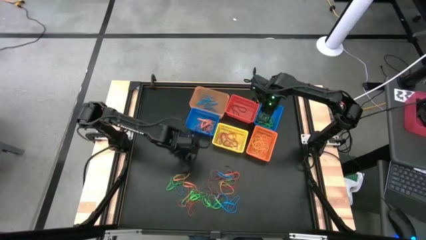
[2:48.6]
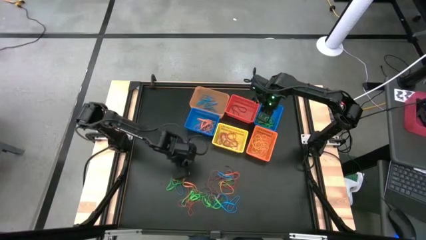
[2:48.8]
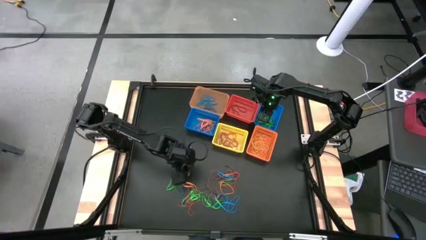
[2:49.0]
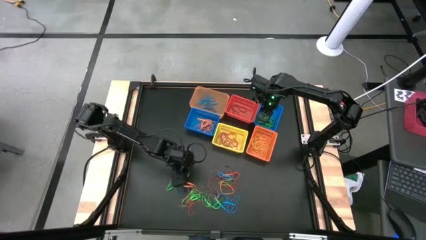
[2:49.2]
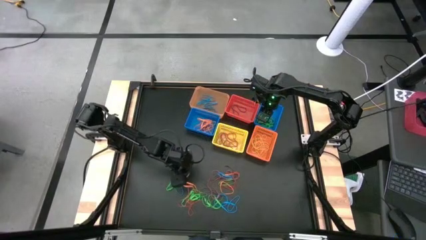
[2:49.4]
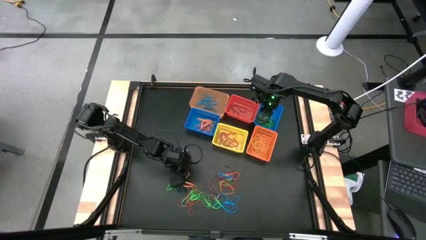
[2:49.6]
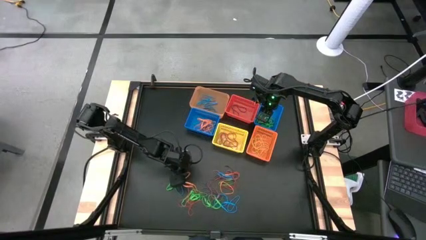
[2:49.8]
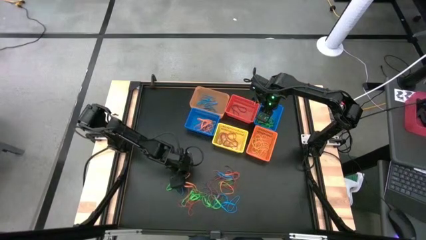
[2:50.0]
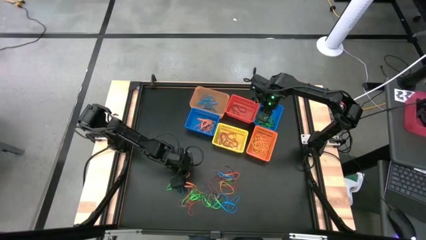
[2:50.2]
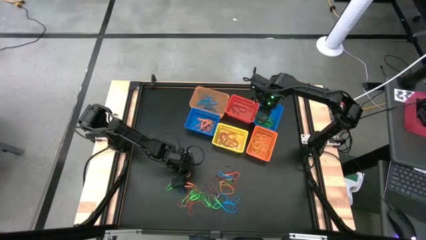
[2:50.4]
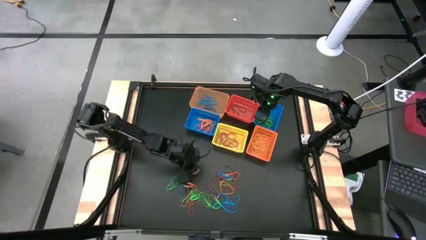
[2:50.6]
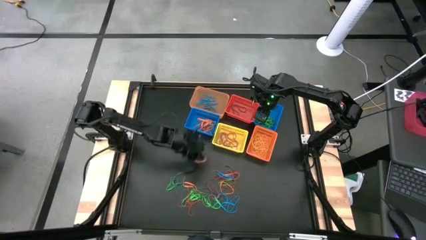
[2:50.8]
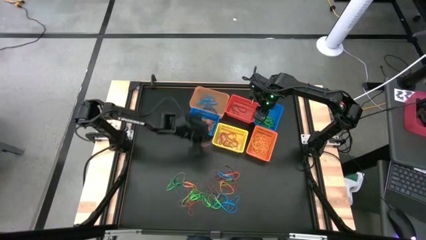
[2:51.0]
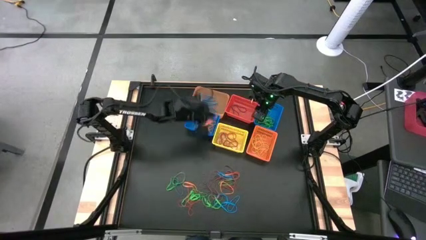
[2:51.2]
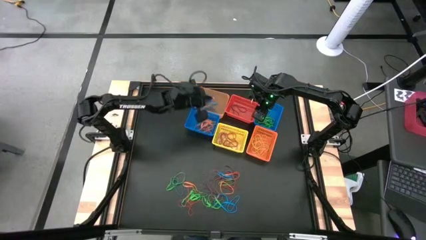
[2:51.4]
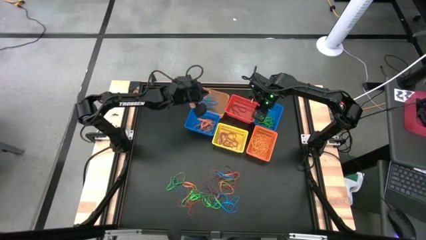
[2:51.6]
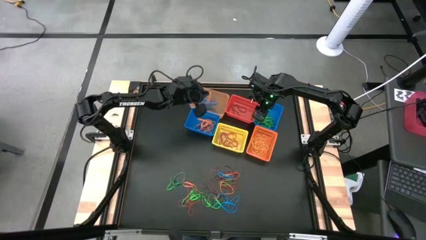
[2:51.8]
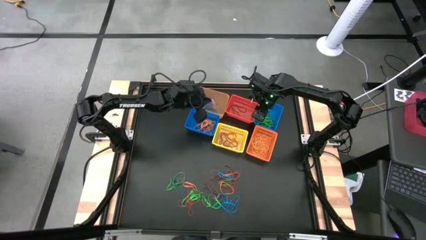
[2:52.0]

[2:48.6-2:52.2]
Task: Sort rubber bands into baskets
Put the orange rubber band into the left blue basket

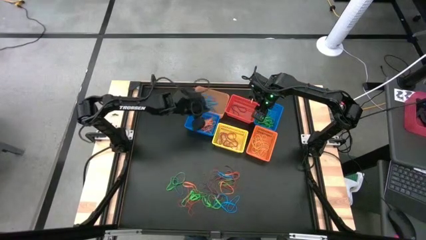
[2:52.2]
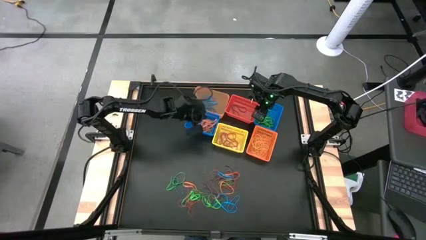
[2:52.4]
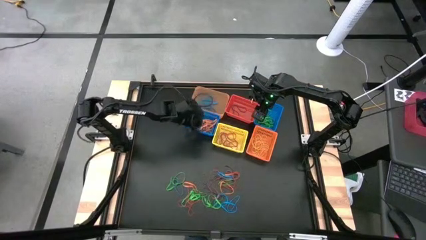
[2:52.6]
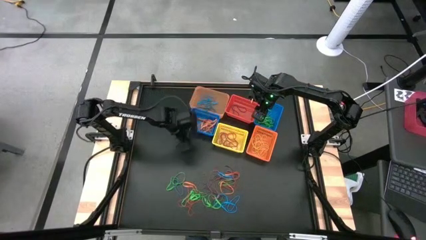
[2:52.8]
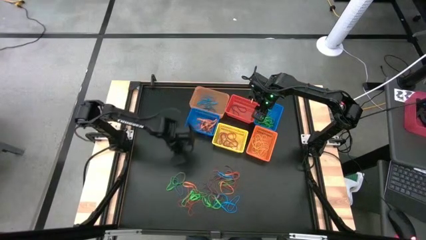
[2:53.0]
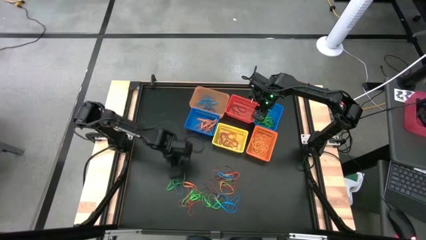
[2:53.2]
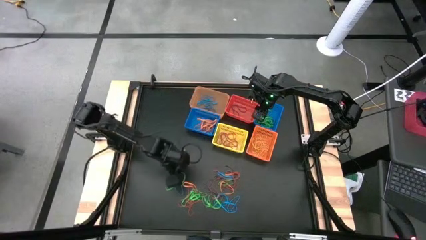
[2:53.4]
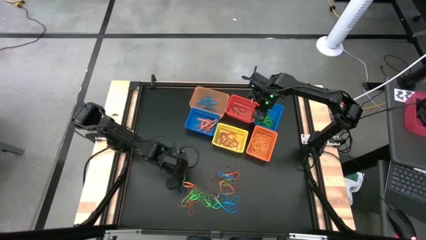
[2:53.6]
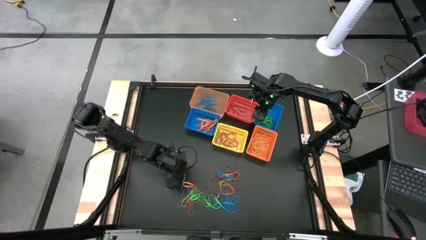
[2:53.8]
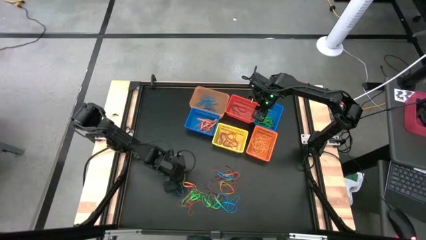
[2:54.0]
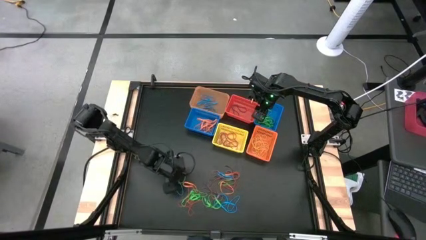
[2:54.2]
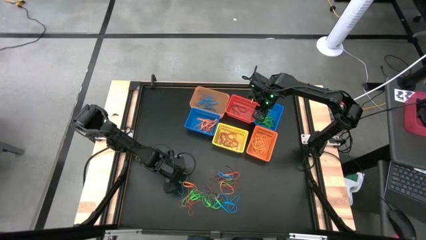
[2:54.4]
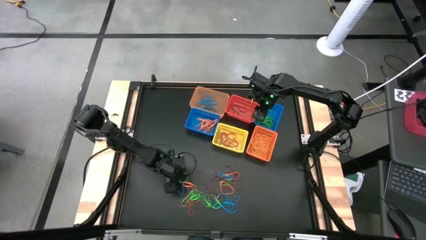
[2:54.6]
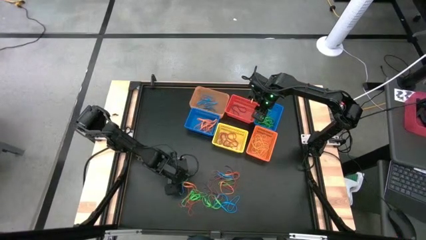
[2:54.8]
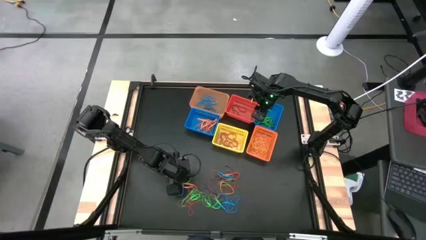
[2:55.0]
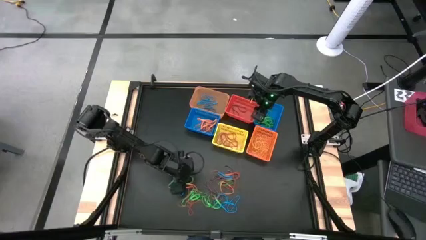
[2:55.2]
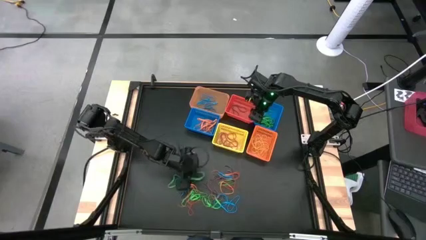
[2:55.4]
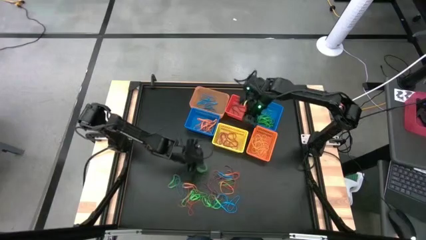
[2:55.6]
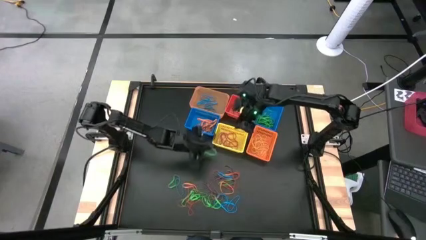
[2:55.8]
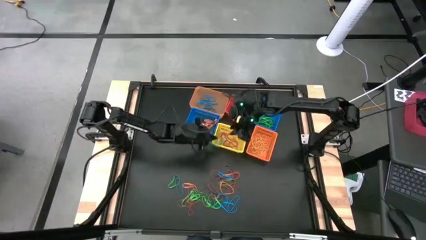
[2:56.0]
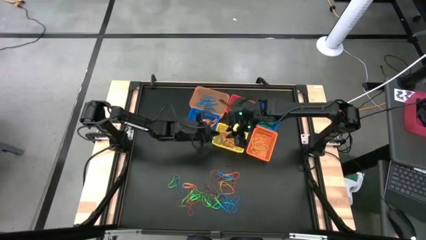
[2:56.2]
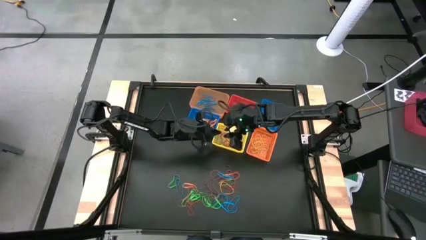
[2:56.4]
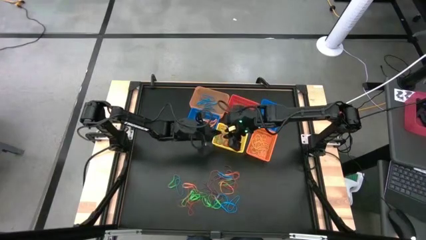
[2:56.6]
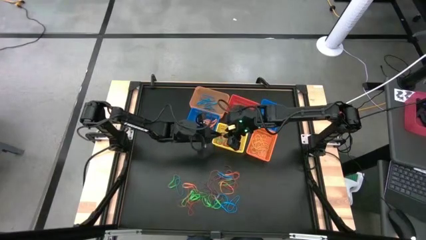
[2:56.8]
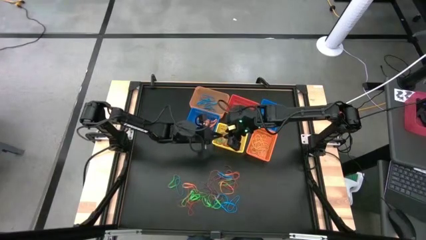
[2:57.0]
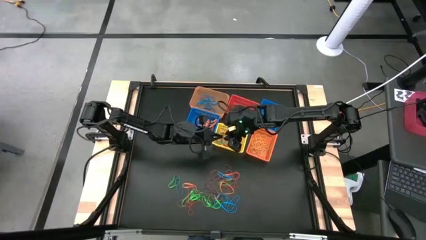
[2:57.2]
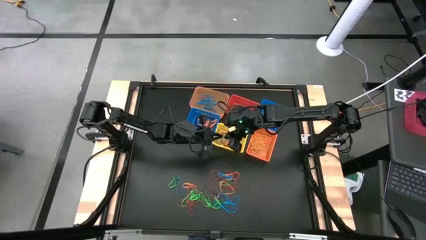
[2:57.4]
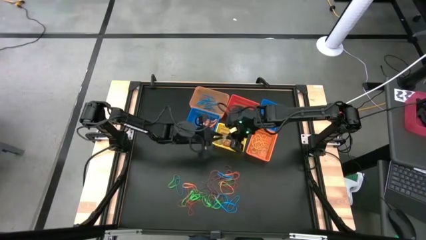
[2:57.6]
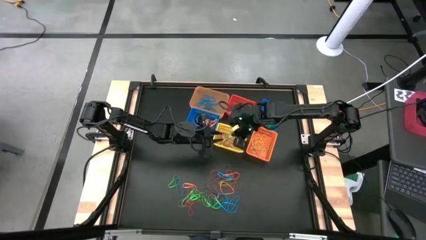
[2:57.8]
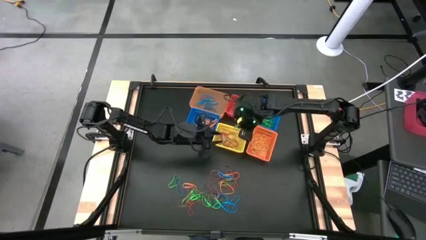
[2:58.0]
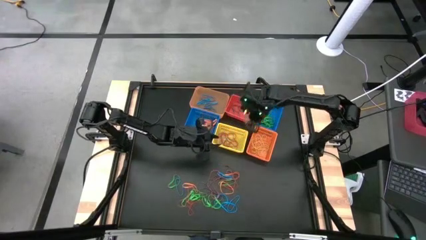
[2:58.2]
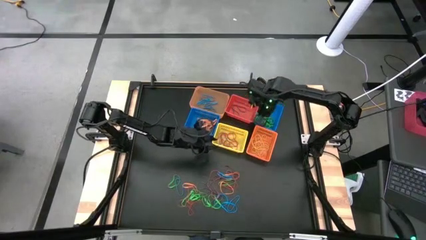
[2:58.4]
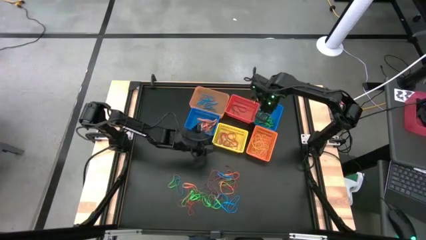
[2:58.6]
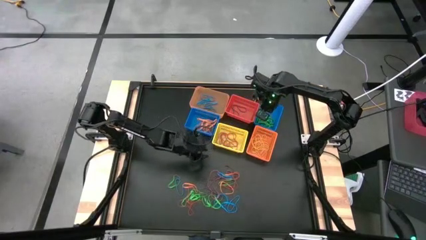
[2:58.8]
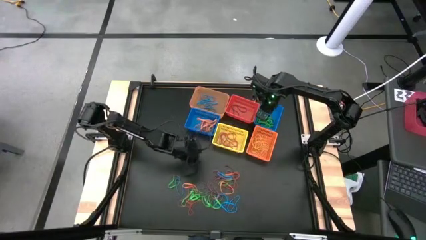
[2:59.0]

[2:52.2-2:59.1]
Put the green rubber band into the right blue basket

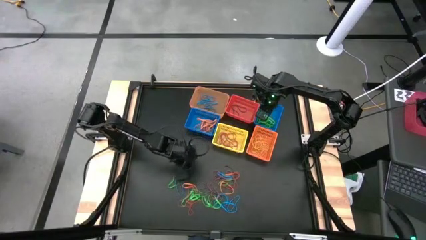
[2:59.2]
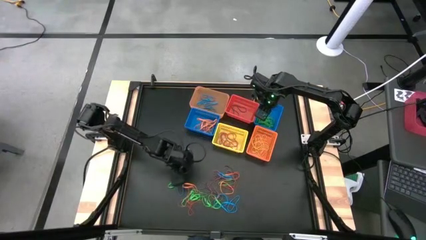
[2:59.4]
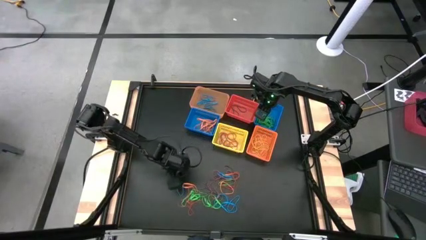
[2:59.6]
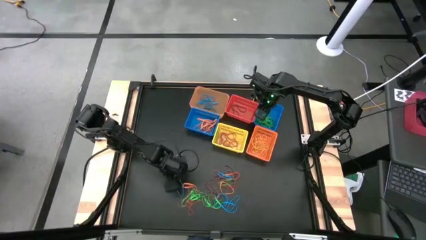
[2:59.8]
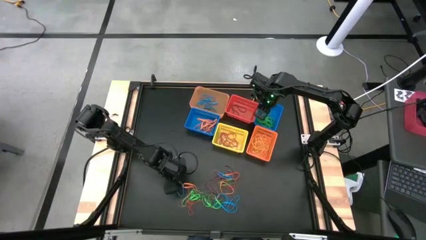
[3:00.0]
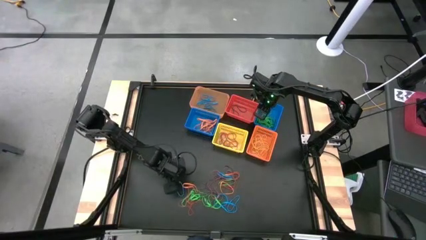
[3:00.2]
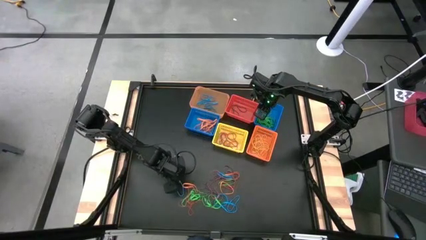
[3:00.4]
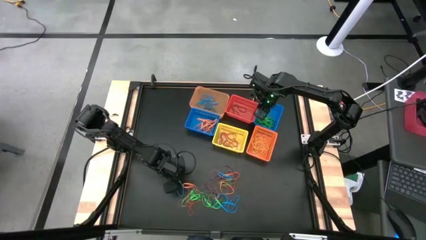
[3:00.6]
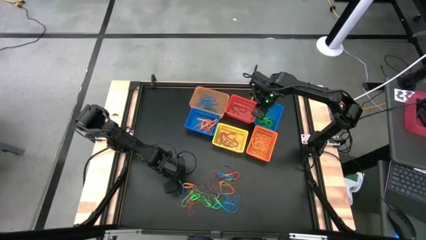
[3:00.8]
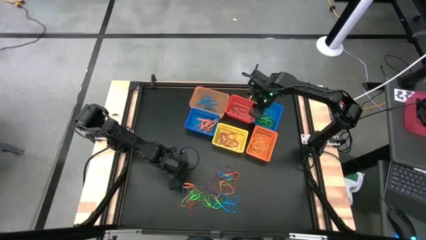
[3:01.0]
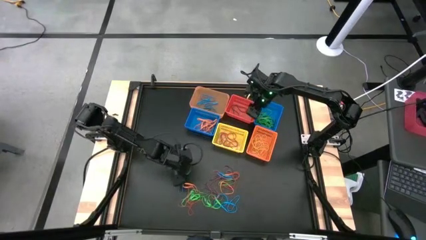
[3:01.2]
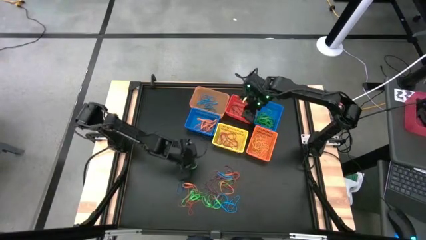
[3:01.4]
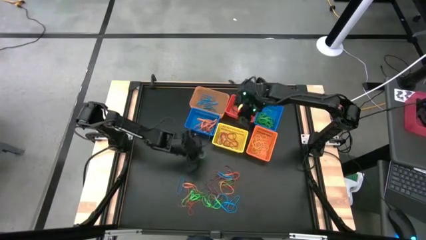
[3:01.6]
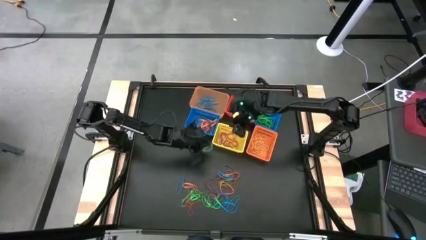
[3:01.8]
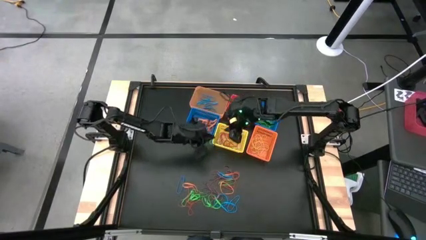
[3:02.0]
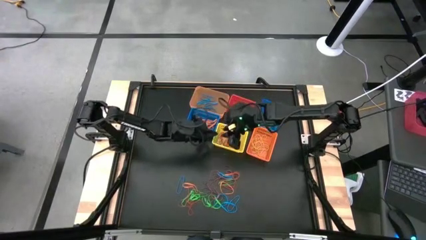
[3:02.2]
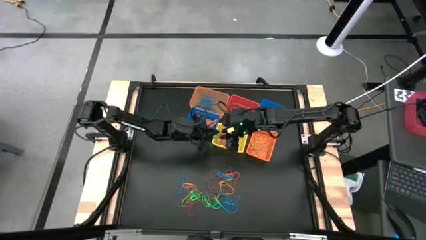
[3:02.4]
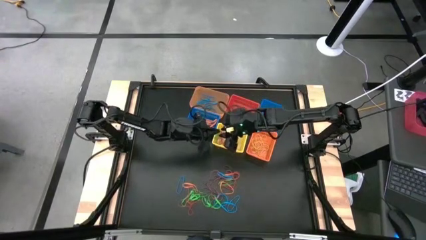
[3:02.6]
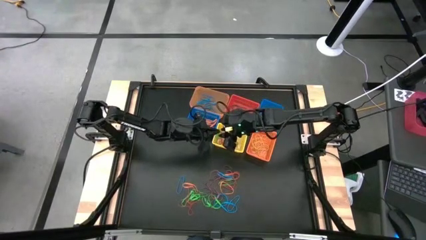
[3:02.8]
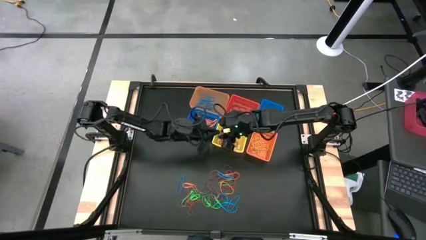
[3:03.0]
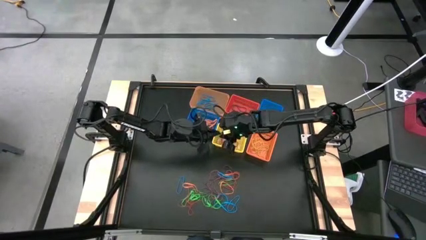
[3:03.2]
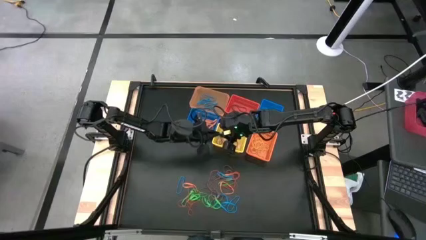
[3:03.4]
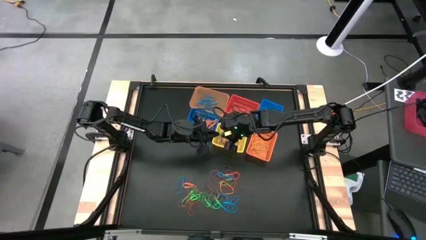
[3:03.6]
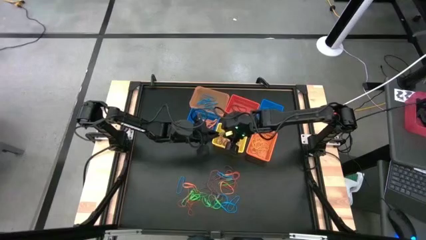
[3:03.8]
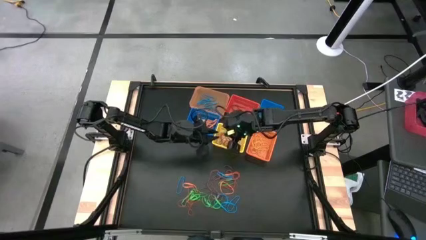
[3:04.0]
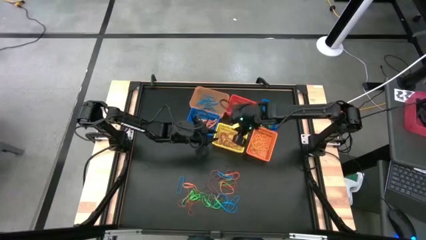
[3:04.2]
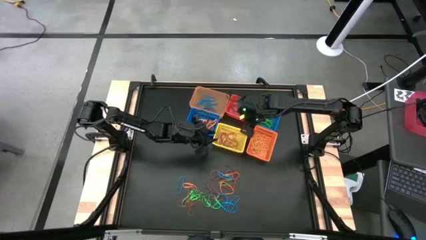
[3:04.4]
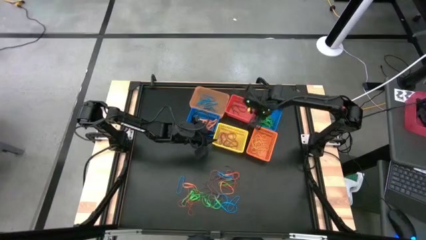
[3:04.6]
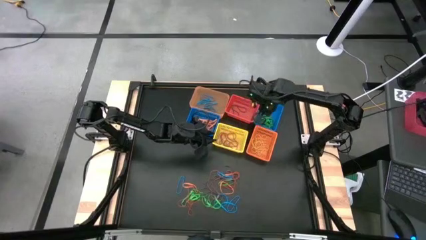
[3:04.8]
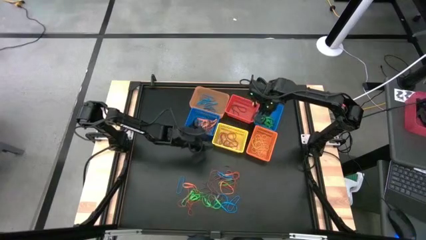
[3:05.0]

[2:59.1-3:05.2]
Put the green rubber band into the right blue basket

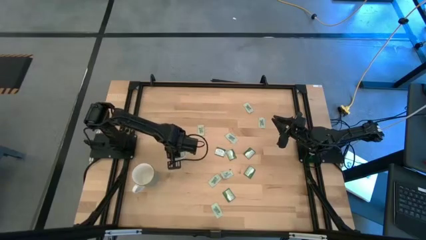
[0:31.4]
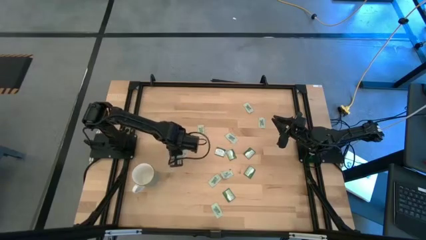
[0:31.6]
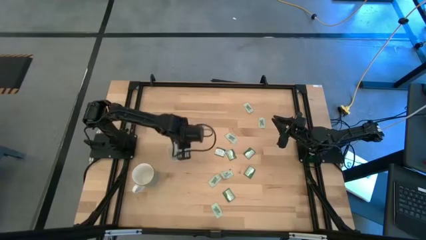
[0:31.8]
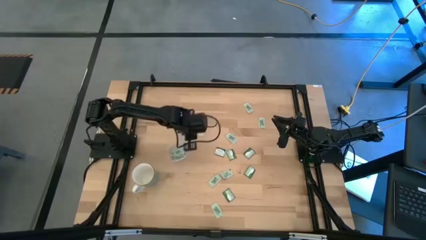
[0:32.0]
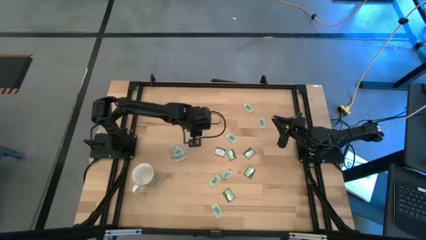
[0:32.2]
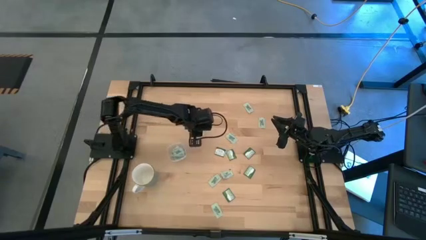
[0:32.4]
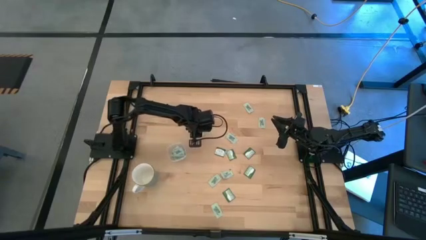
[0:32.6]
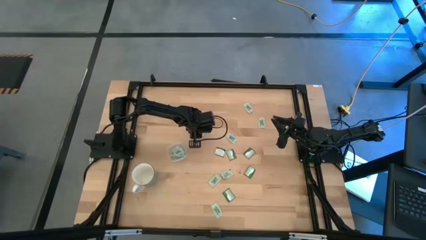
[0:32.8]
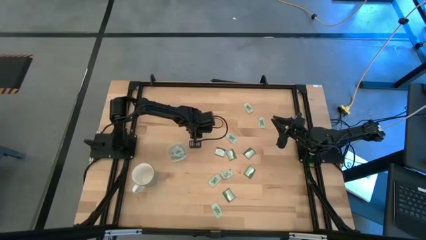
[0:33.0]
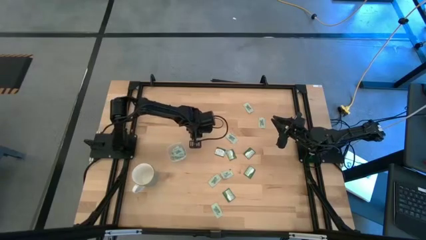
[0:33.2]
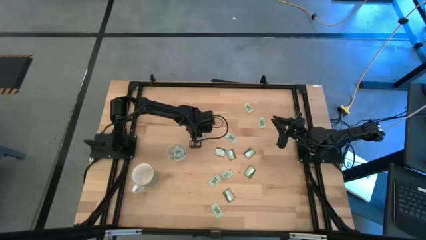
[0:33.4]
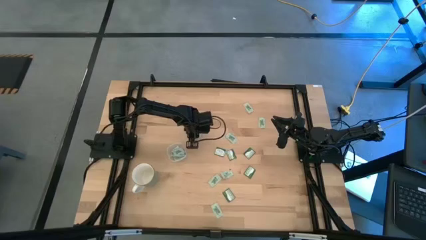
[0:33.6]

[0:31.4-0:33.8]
Task: Pick and place Stevia / Truvia into bins
Put the green stevia packet into the transparent container
